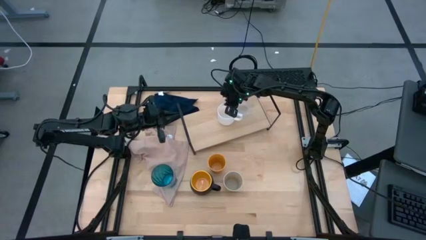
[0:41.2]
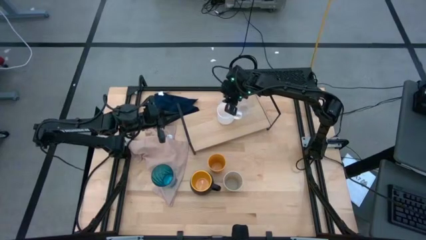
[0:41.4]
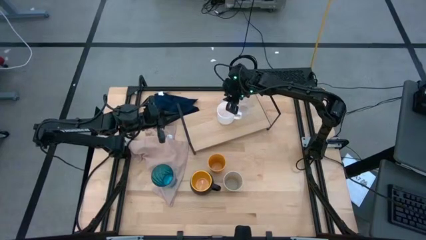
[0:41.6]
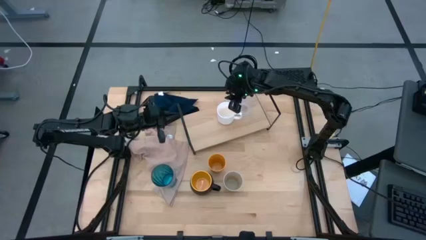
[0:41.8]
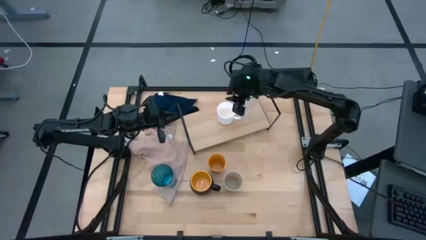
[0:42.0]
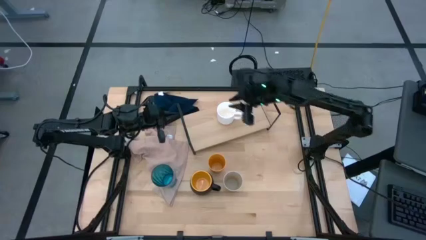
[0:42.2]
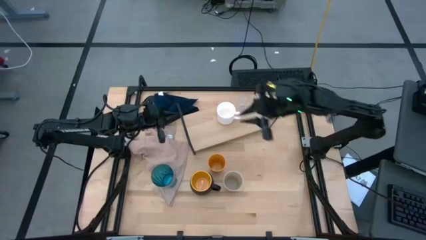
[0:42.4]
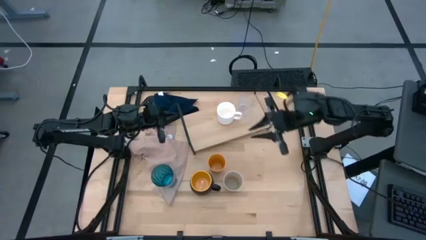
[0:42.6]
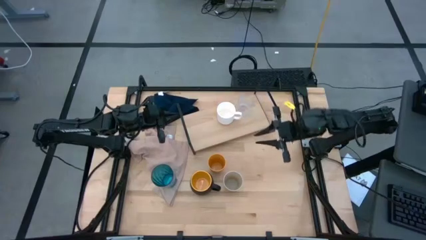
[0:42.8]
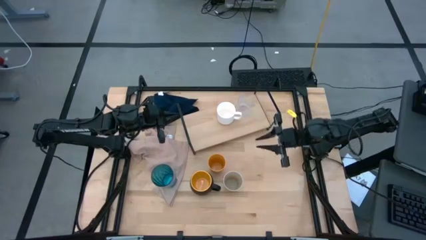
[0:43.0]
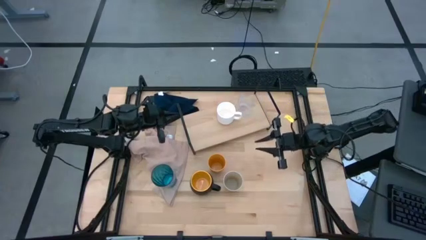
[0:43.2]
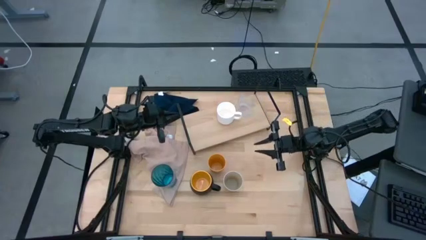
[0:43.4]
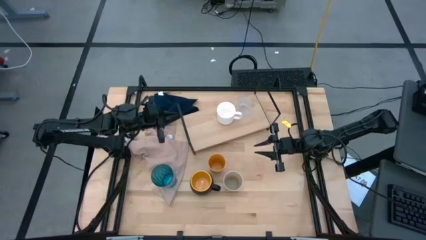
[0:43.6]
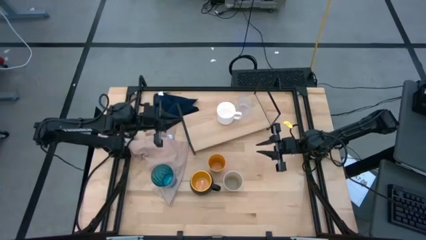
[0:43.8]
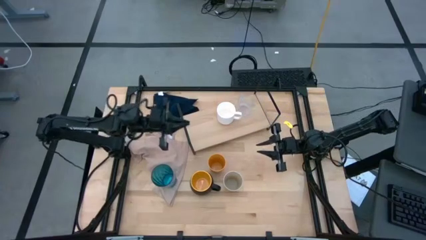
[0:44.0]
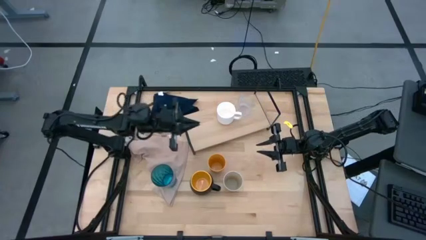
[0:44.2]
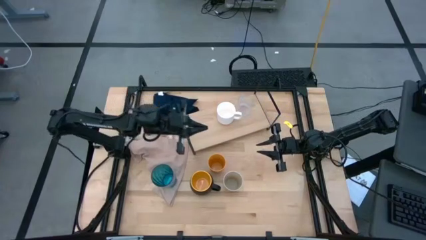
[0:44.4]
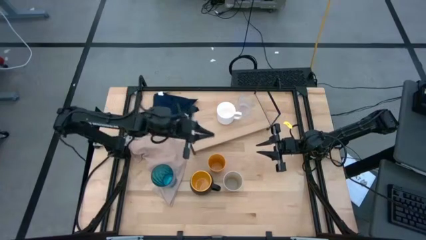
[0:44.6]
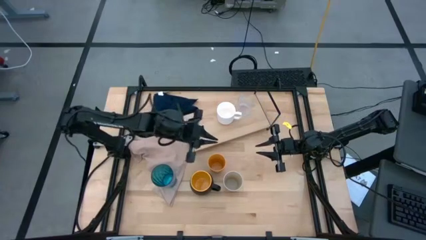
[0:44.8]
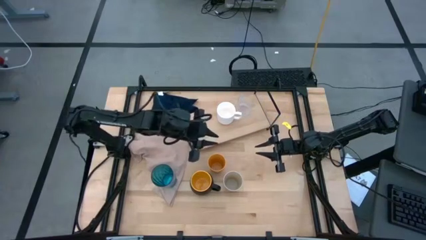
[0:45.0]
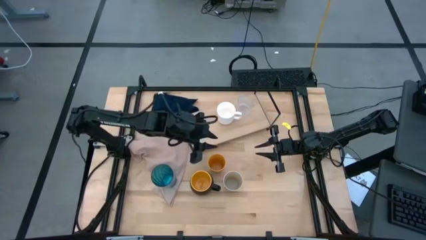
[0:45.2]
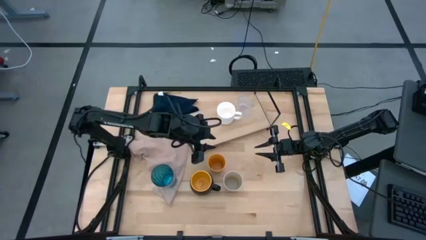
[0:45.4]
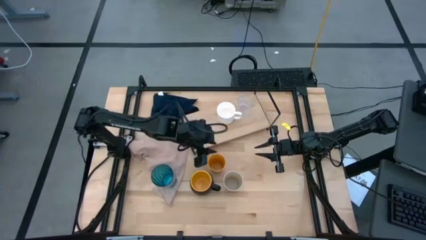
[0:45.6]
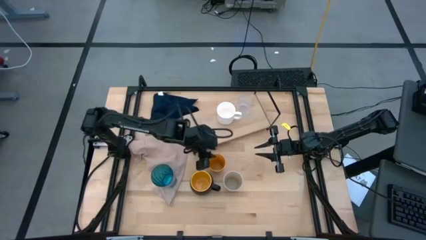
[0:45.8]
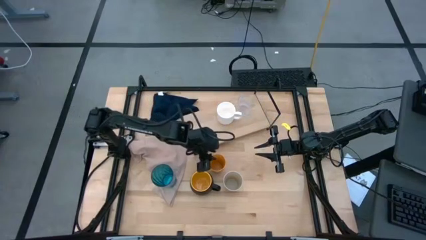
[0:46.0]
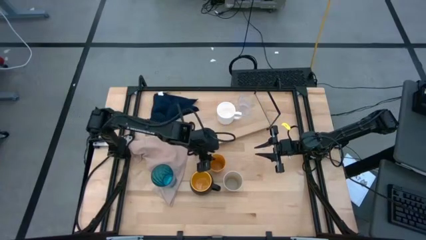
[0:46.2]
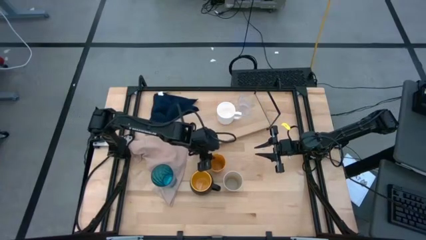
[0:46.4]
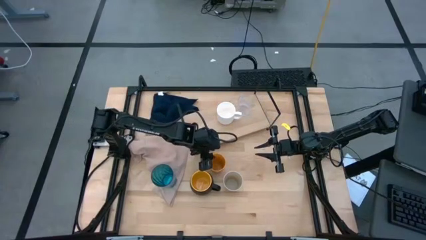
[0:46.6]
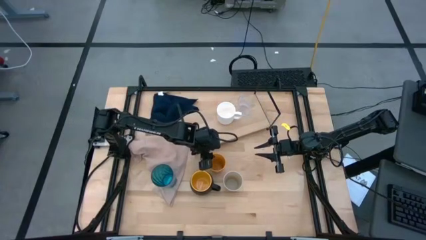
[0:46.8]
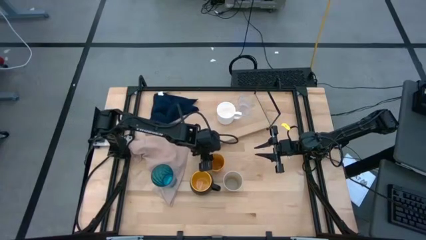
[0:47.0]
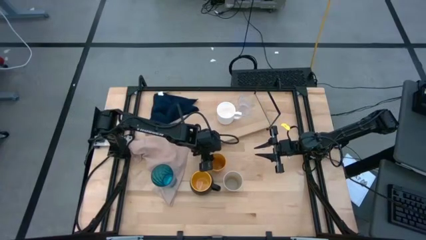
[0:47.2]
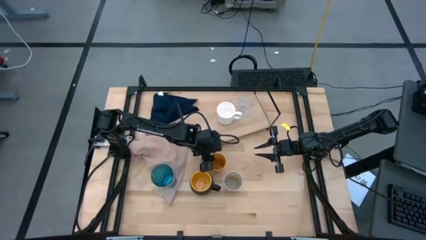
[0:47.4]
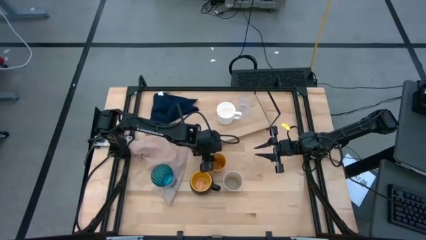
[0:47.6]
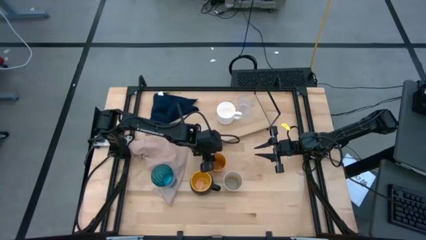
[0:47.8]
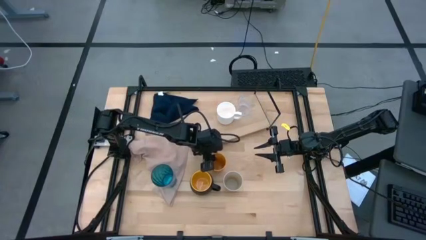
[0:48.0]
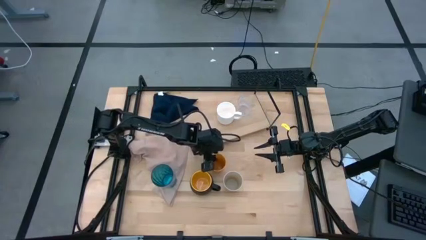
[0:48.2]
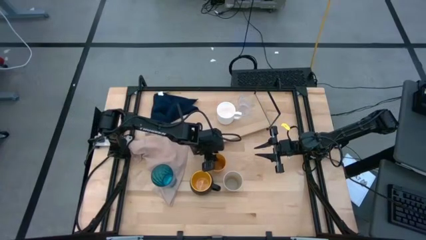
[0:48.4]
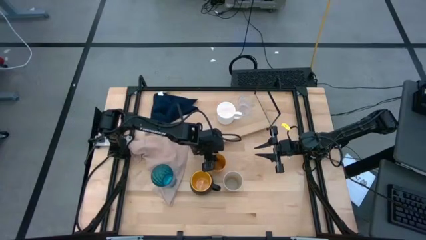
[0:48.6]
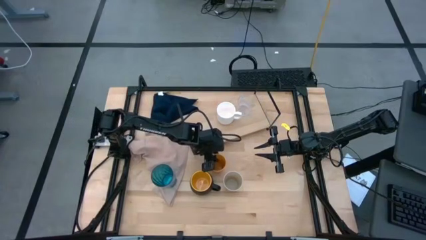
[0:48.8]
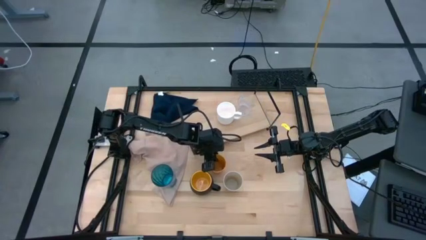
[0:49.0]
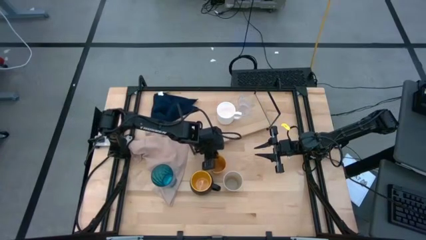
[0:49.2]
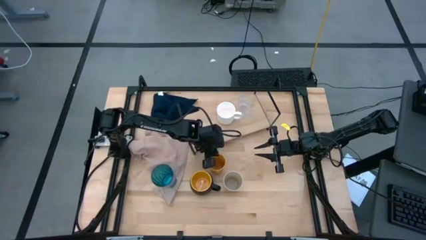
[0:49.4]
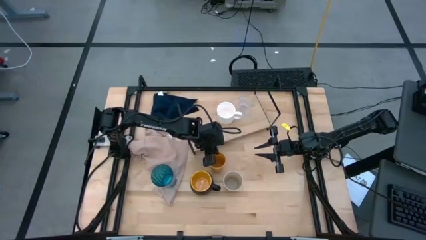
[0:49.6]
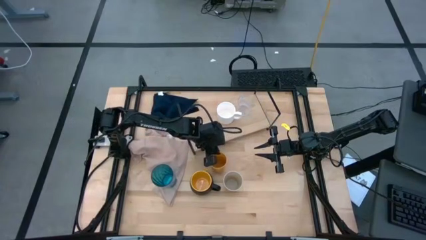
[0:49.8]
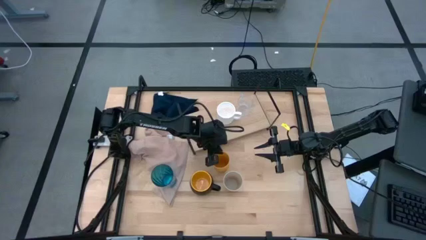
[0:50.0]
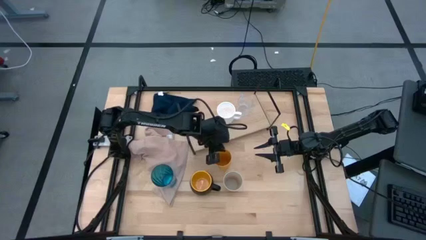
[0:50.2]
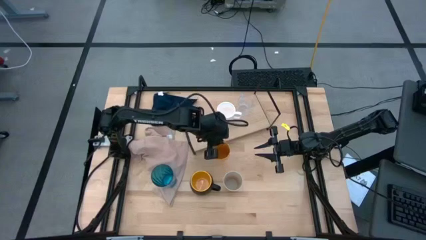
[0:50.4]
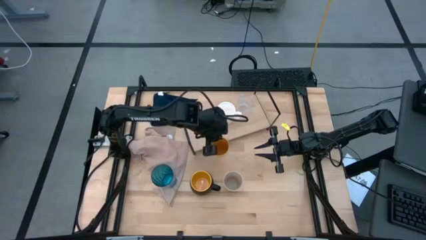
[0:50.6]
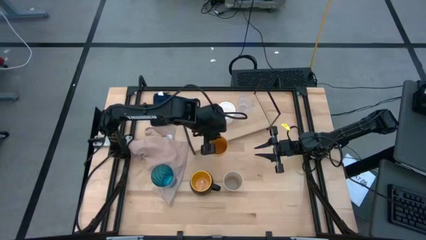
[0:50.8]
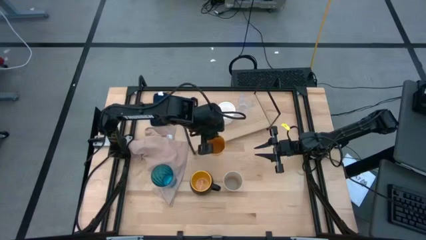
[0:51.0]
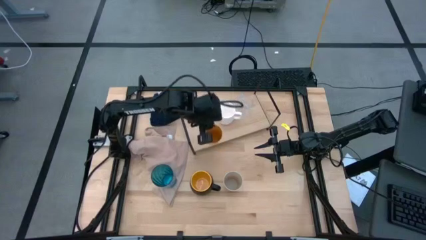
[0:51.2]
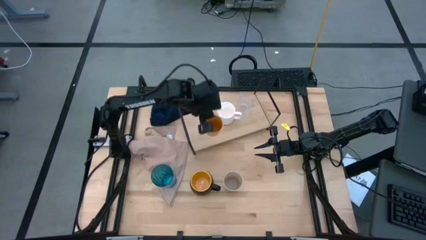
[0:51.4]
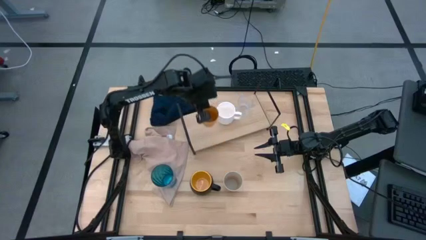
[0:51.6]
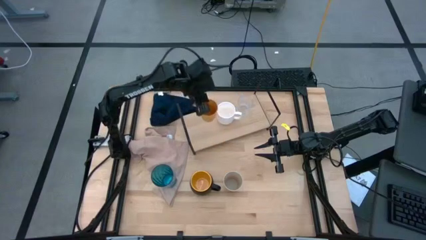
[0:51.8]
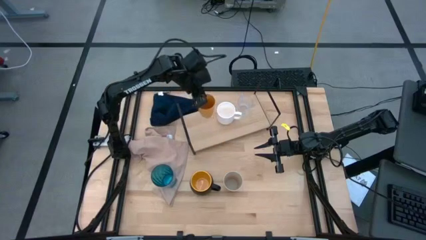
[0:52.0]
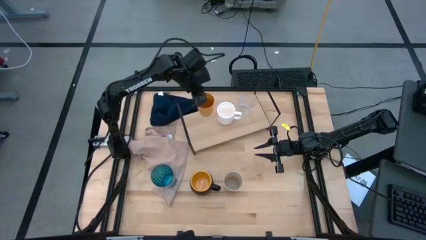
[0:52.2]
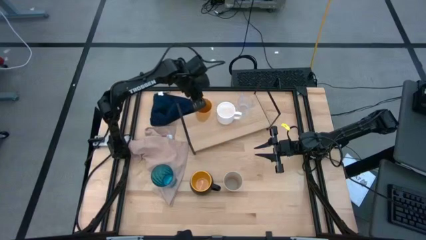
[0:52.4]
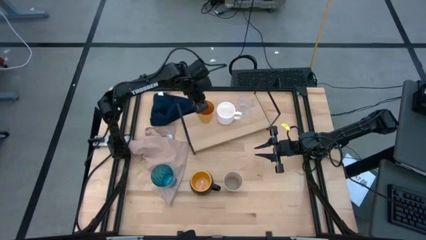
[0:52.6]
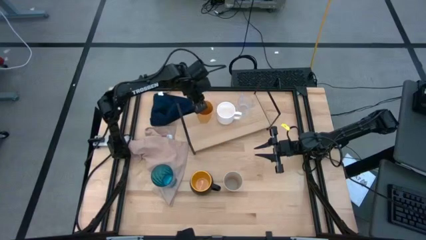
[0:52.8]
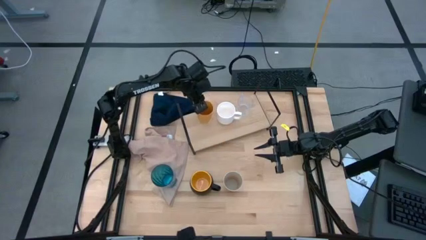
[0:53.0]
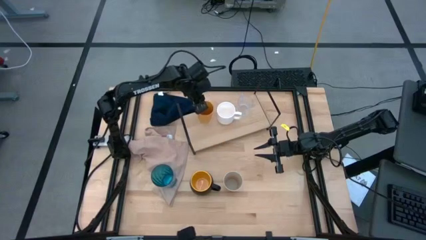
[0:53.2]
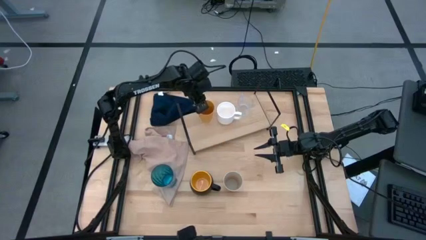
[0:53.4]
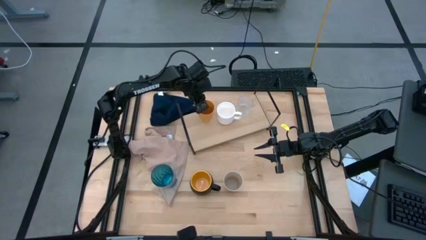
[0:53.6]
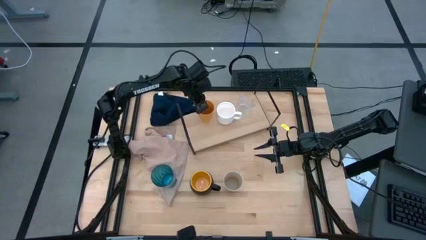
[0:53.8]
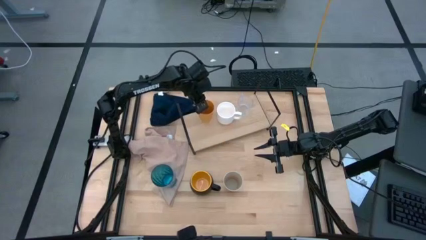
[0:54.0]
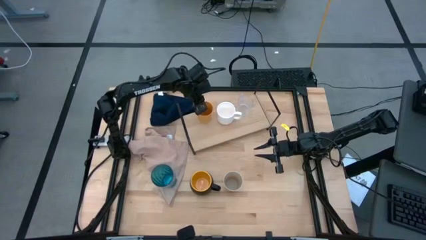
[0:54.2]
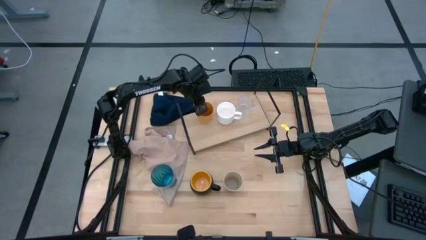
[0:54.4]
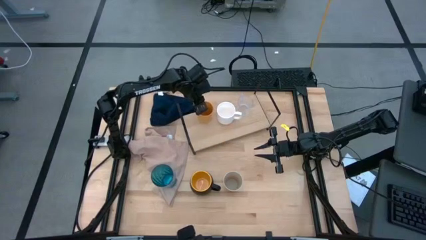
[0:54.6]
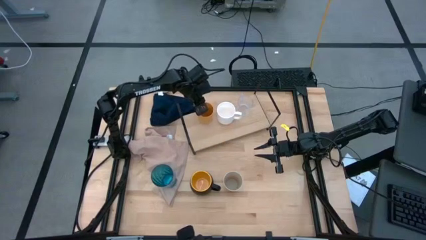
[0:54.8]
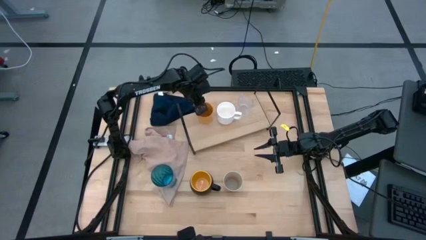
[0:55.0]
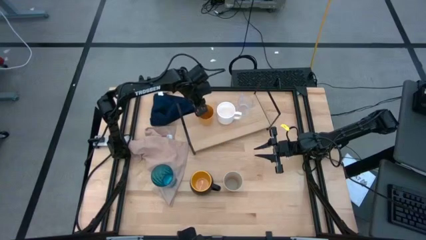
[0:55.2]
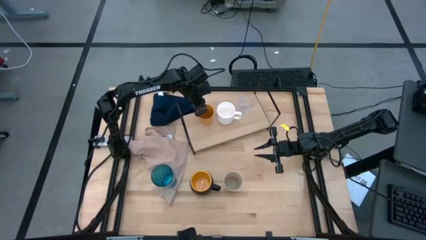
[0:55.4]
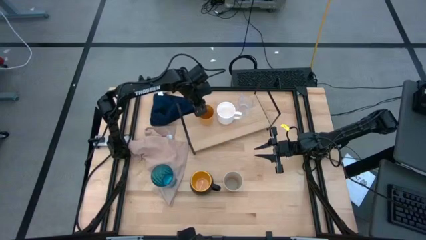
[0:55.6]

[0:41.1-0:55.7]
Task: Stack small to large cups/mugs on shelf
Put the yellow cup on the shelf
